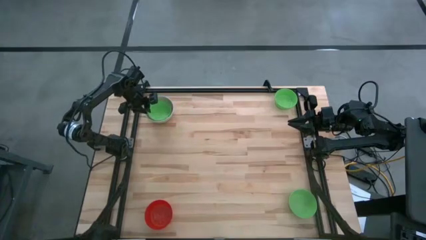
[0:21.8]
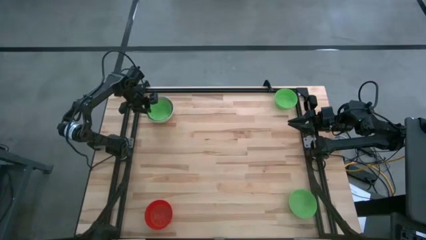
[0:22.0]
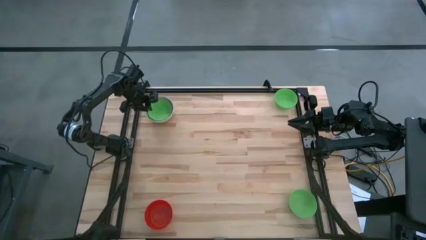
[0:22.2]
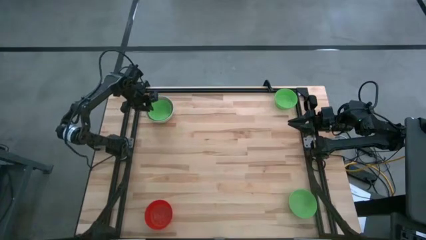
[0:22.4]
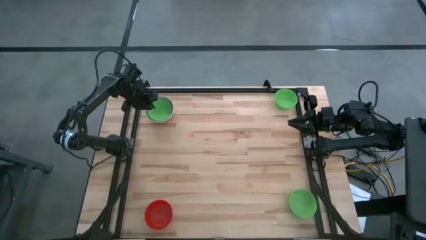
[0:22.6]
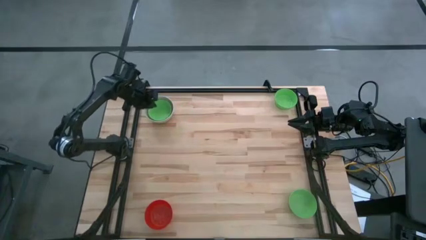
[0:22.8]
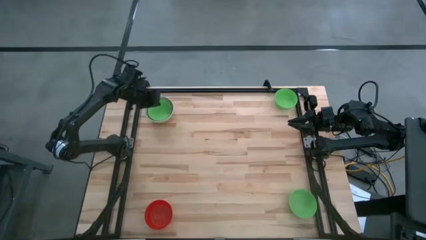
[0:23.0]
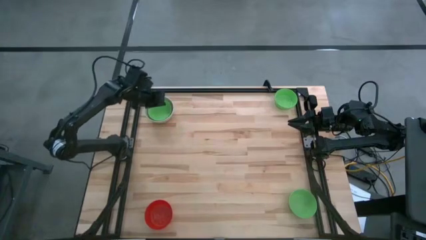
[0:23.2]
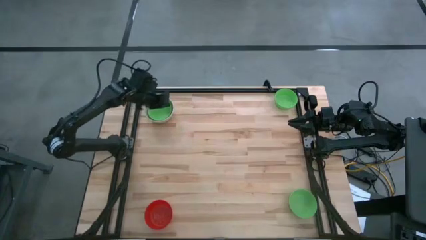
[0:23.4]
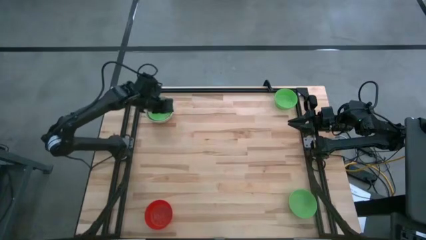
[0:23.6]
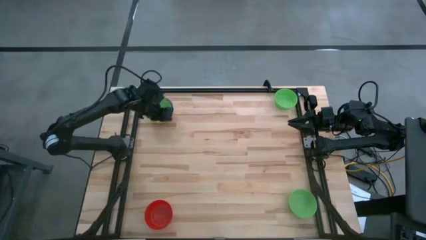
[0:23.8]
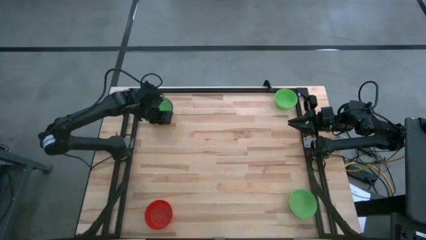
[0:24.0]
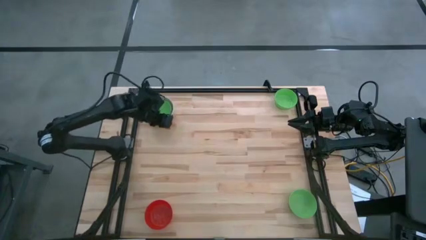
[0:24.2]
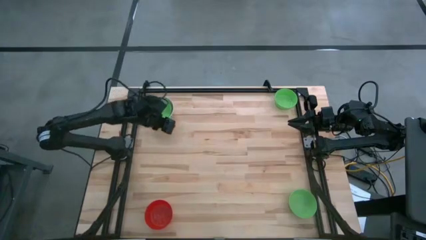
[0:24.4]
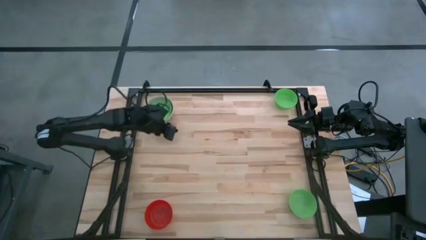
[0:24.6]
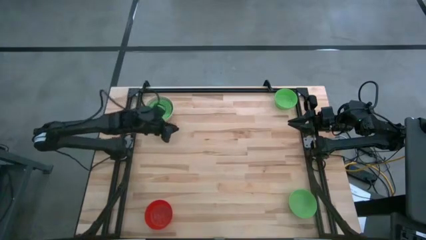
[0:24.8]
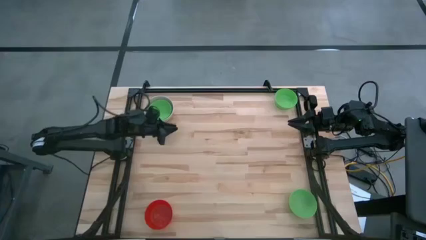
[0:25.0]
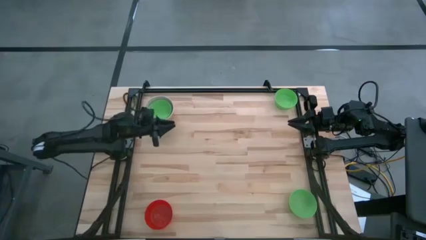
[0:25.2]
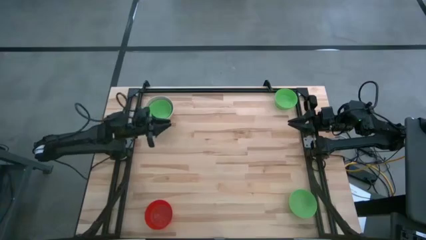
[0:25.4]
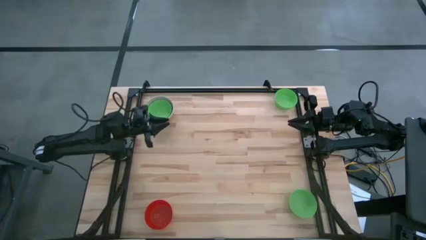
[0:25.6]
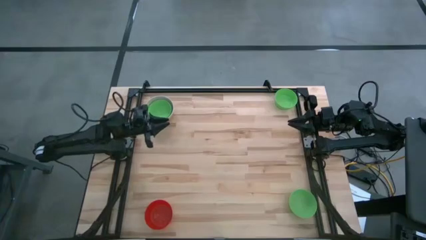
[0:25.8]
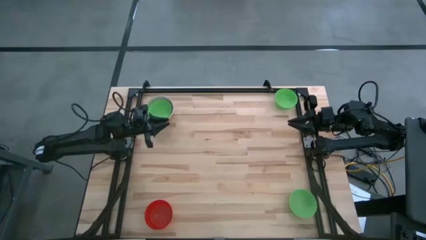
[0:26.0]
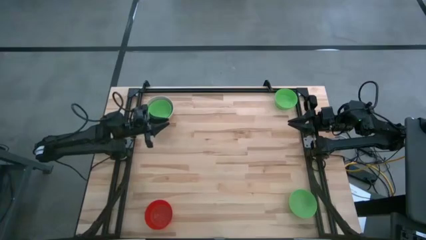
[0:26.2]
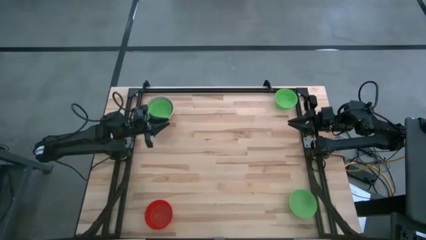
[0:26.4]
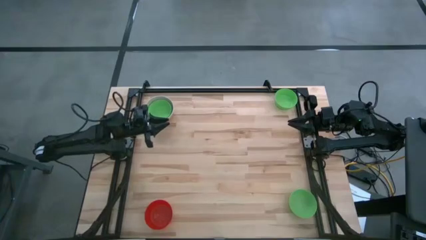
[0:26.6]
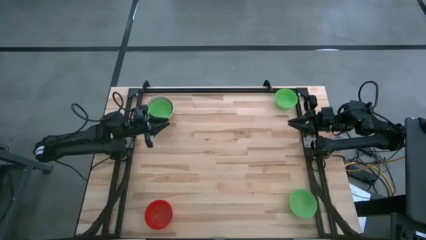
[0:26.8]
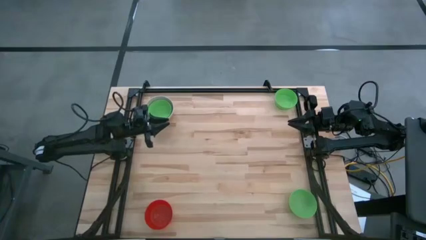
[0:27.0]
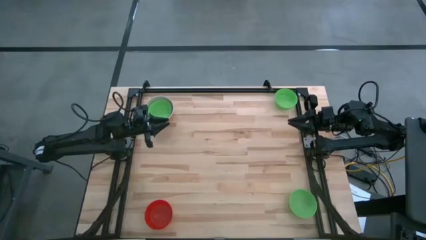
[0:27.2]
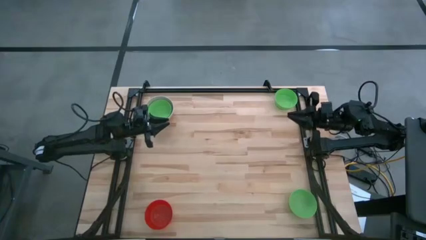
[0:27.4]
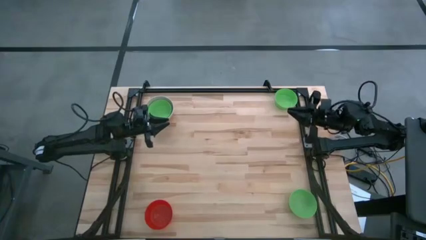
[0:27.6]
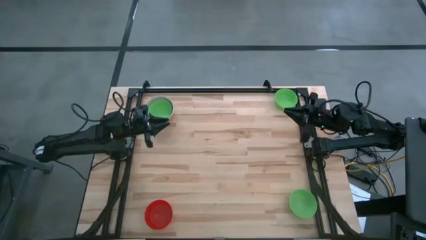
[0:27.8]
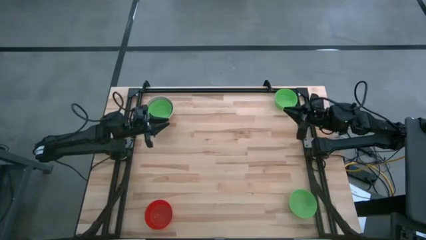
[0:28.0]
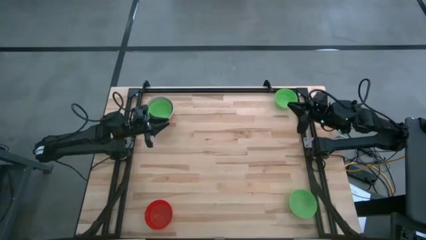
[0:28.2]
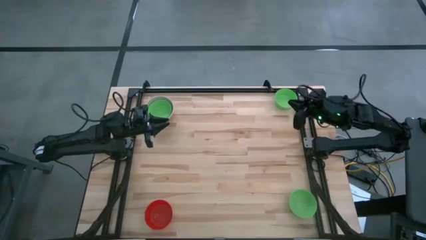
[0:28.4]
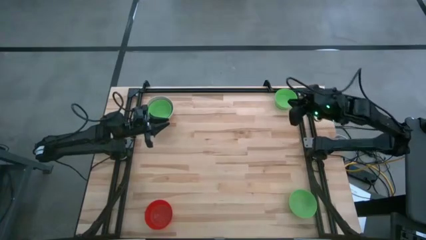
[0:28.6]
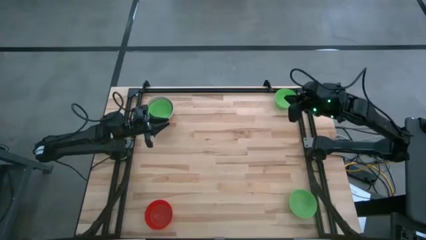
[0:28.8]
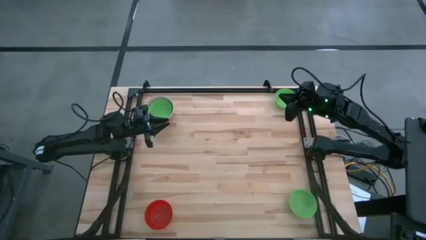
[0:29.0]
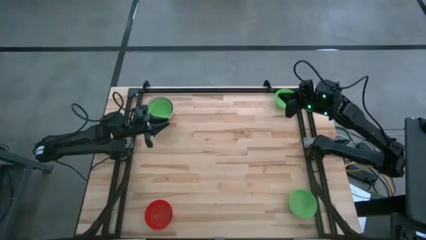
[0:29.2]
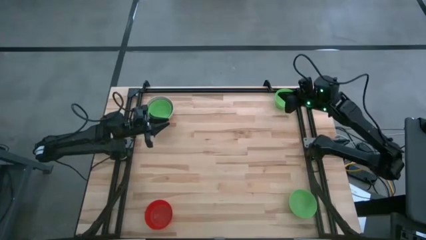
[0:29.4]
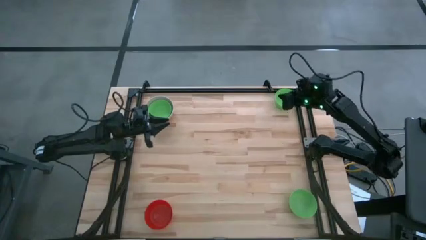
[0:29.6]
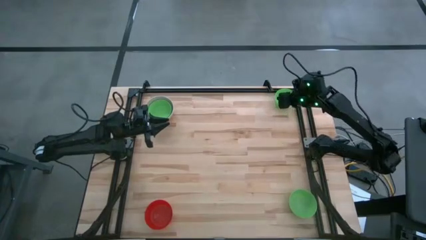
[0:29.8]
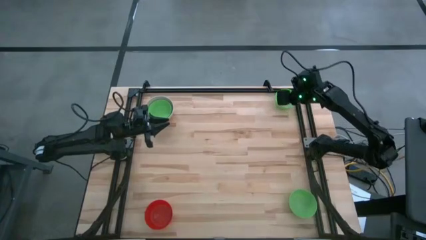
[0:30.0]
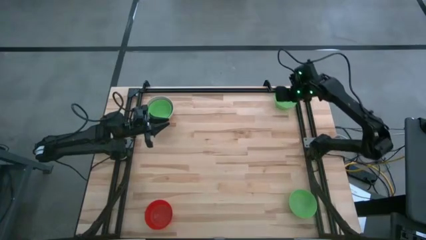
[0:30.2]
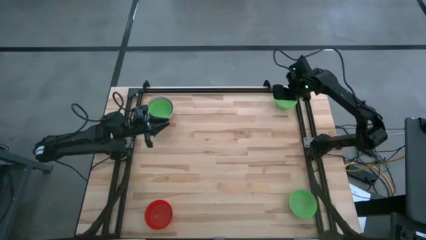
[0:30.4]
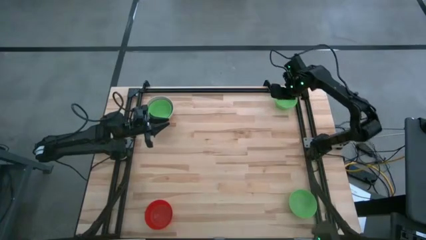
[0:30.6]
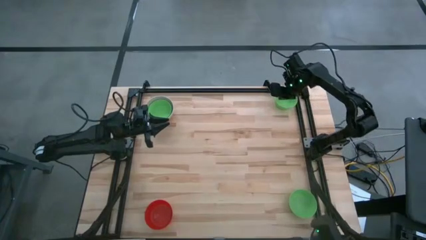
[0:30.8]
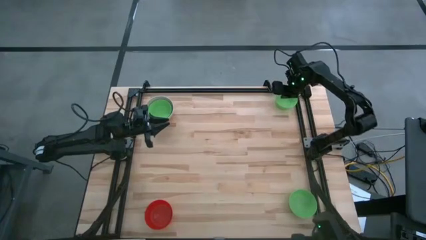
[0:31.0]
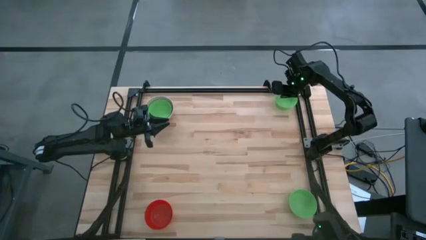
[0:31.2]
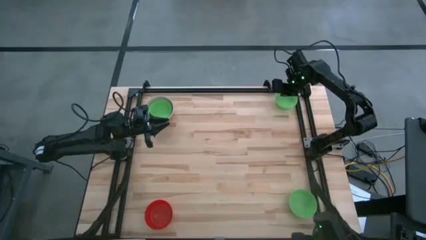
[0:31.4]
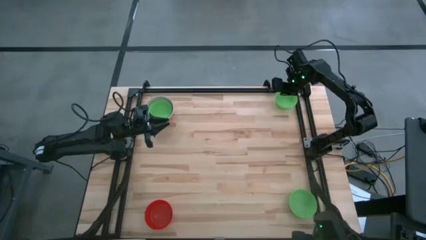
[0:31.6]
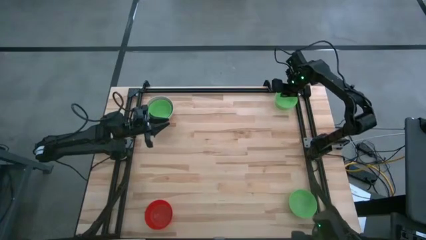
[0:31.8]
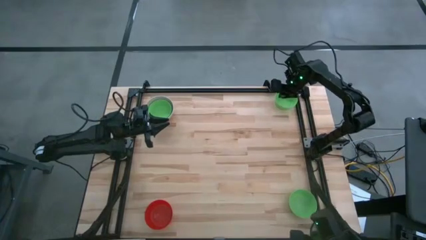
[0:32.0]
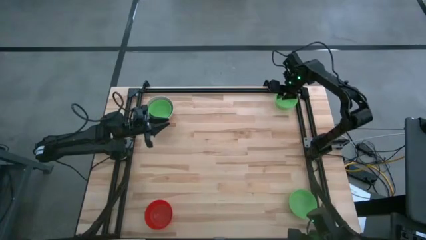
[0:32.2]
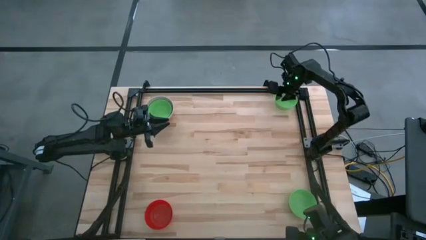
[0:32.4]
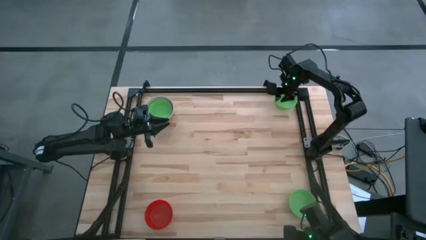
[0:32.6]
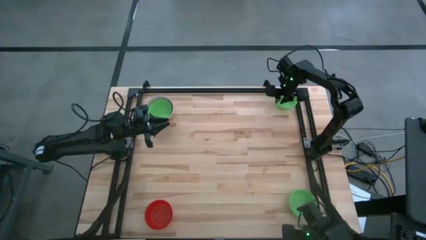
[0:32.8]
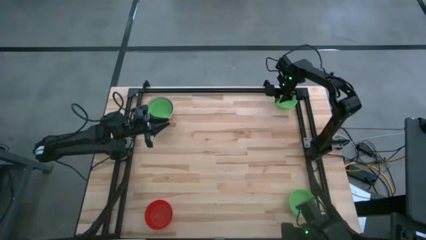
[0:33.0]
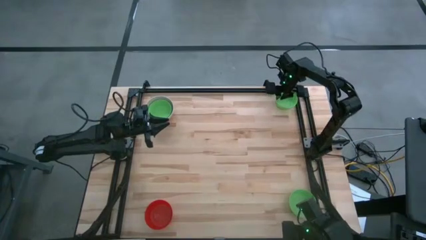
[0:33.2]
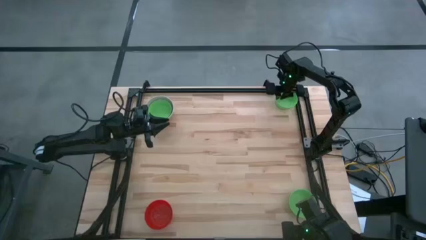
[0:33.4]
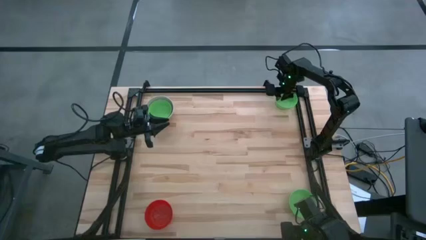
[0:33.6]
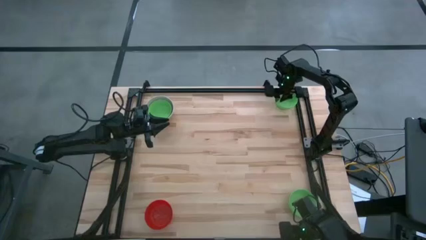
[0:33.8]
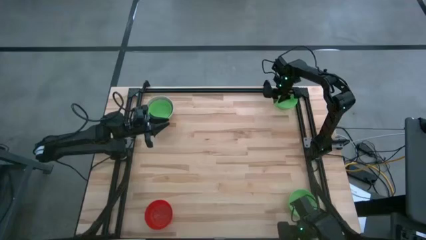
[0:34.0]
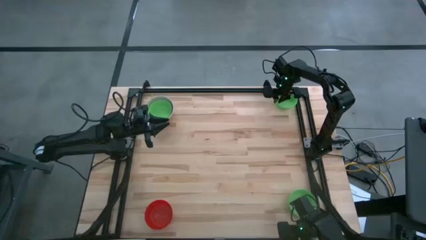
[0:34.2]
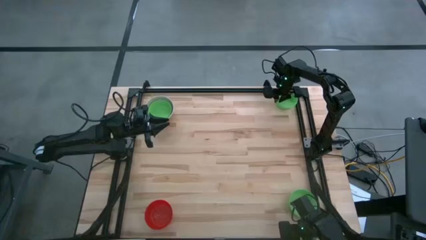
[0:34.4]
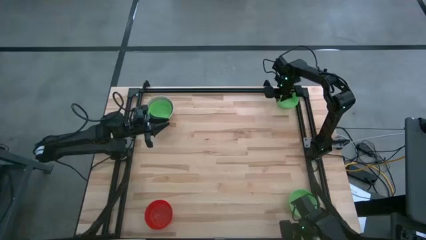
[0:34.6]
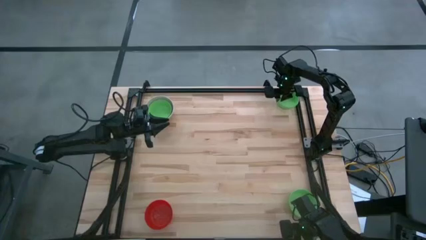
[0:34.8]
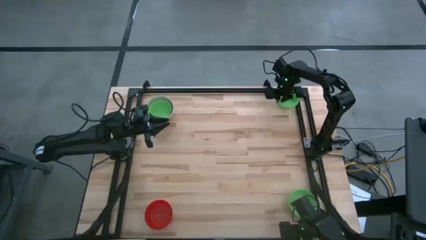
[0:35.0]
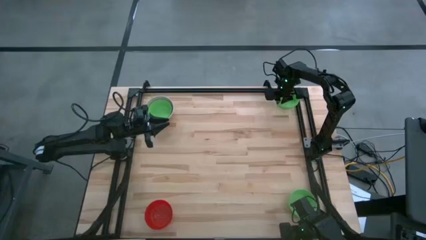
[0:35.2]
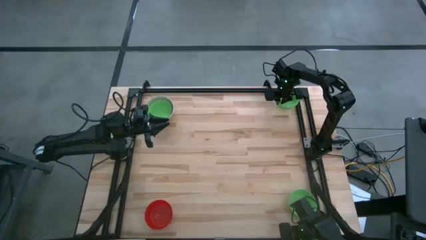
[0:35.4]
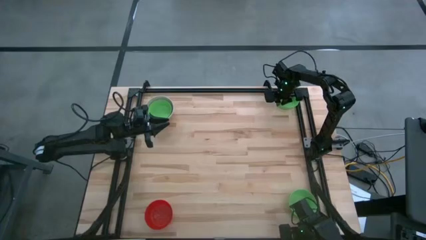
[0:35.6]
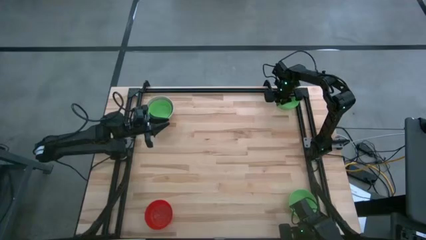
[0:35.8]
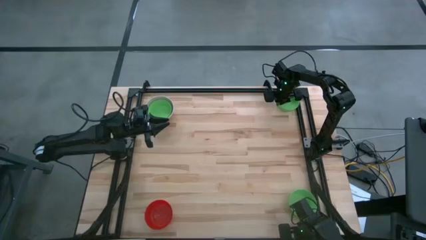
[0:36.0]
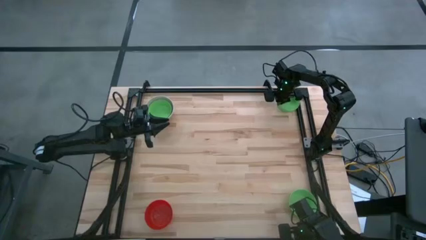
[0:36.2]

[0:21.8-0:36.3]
Stack the top green bowl on the stacked green bowl
